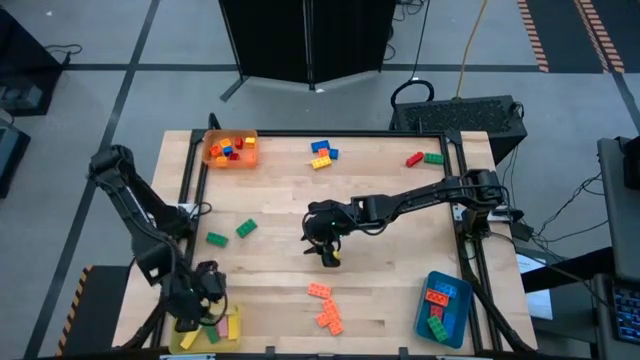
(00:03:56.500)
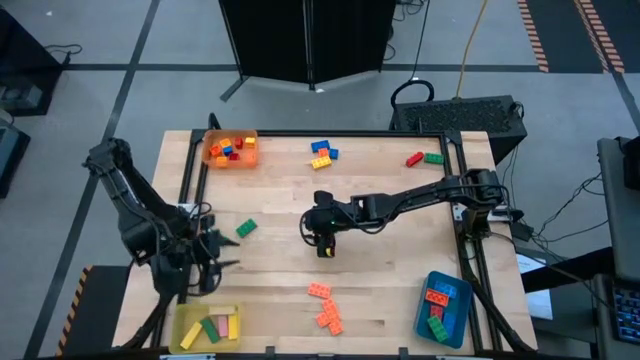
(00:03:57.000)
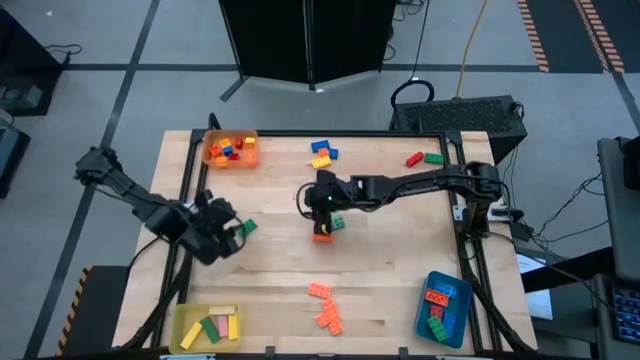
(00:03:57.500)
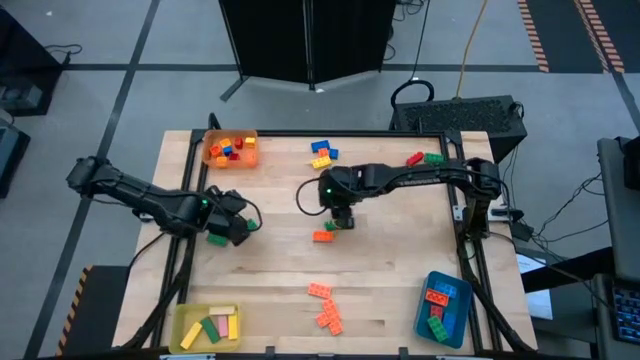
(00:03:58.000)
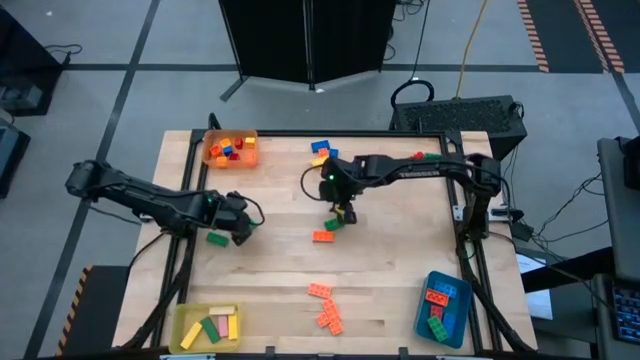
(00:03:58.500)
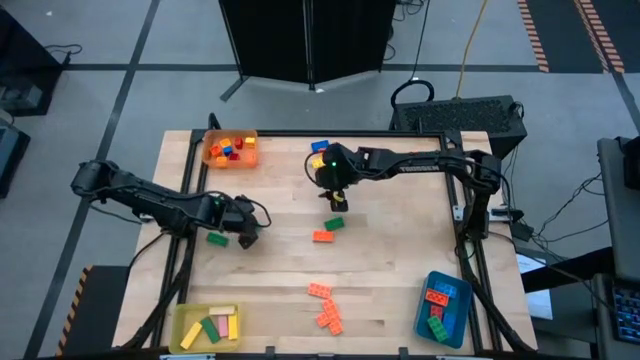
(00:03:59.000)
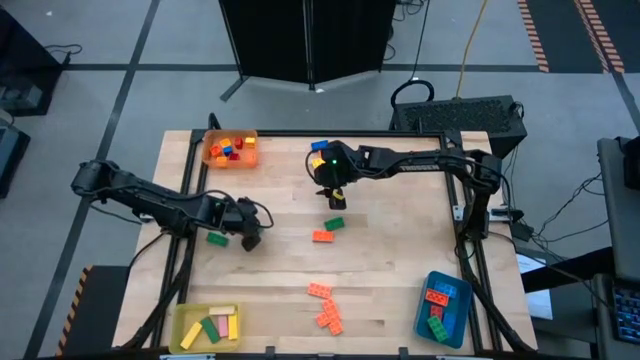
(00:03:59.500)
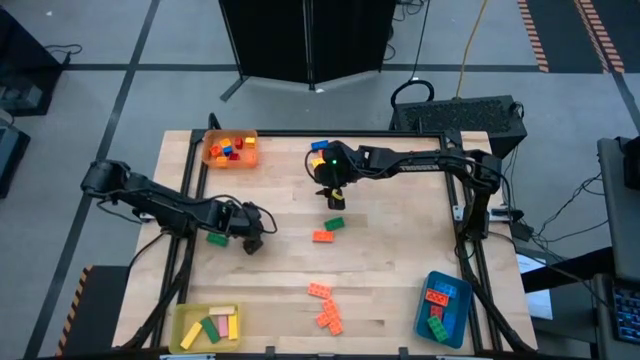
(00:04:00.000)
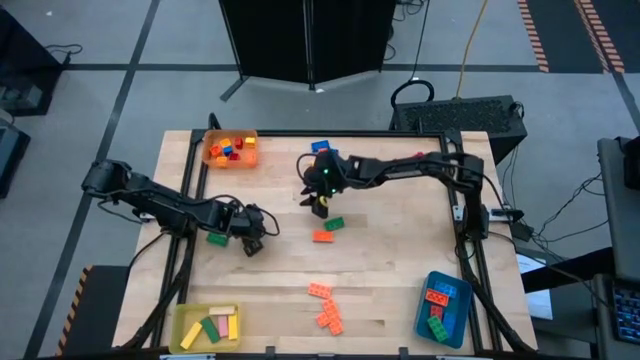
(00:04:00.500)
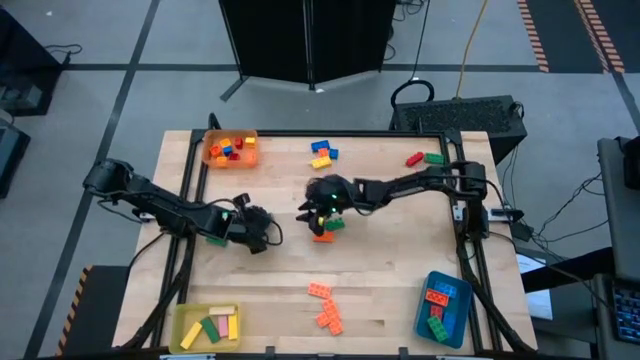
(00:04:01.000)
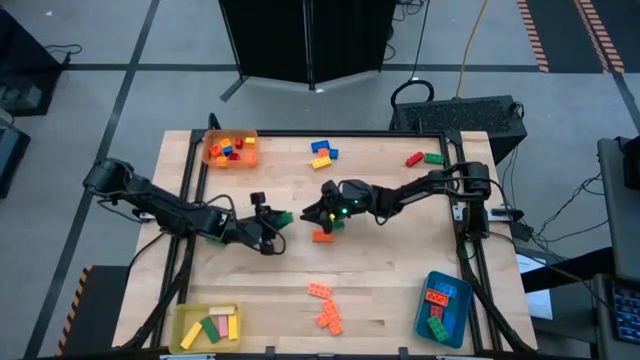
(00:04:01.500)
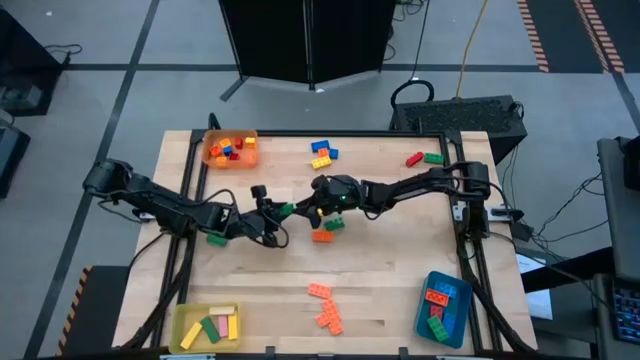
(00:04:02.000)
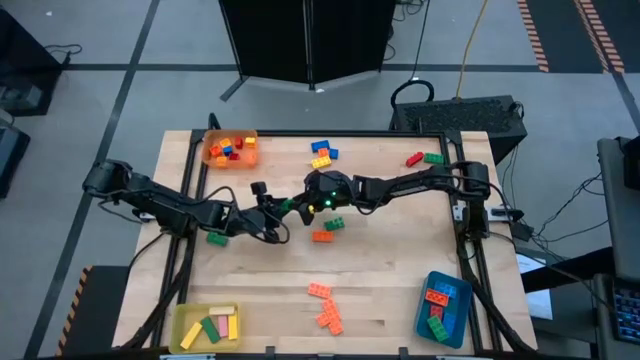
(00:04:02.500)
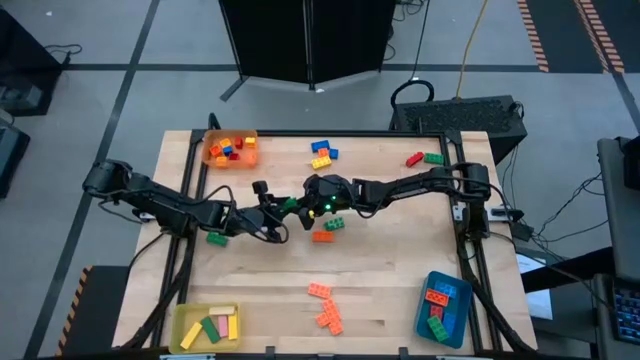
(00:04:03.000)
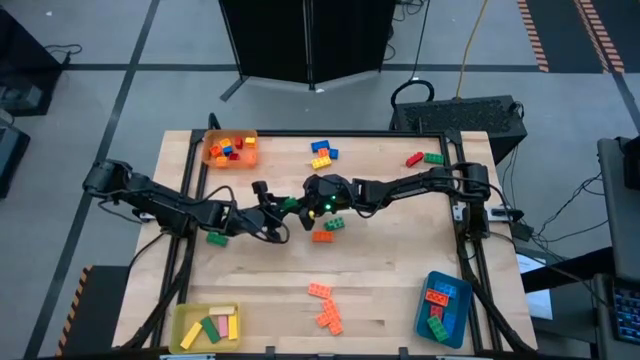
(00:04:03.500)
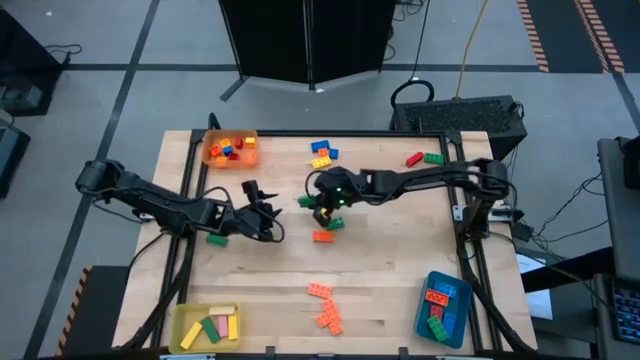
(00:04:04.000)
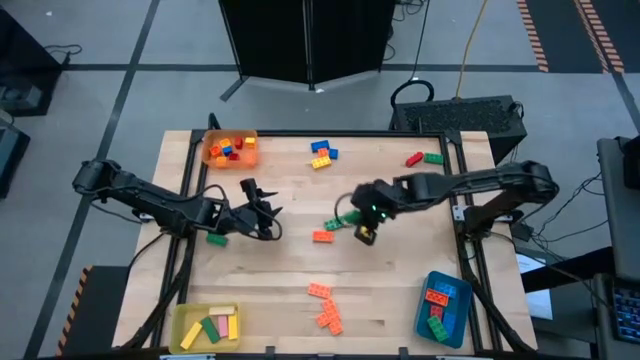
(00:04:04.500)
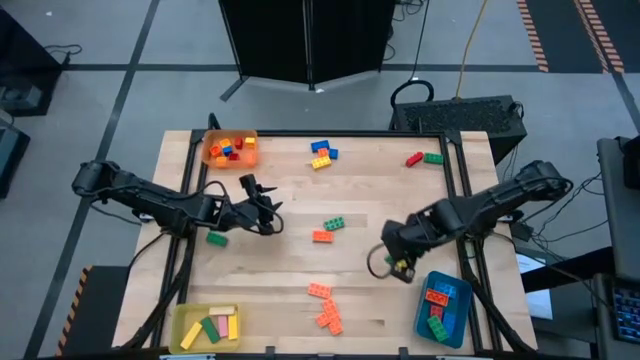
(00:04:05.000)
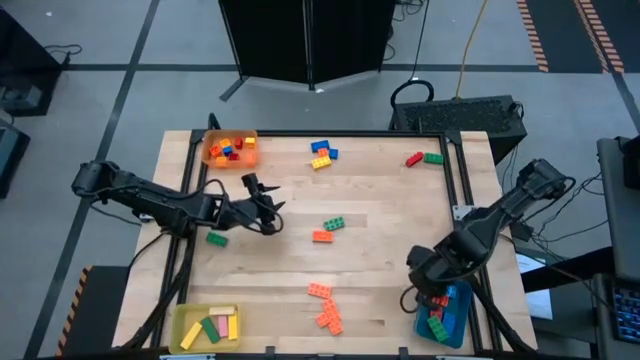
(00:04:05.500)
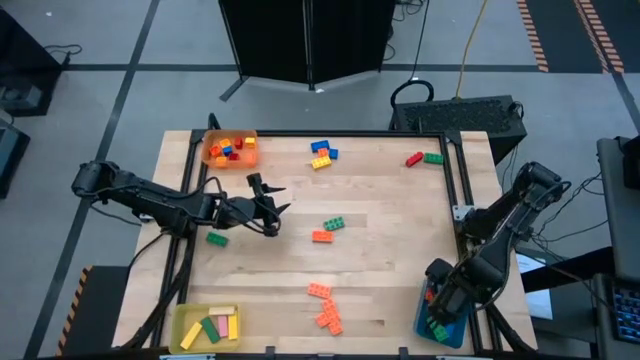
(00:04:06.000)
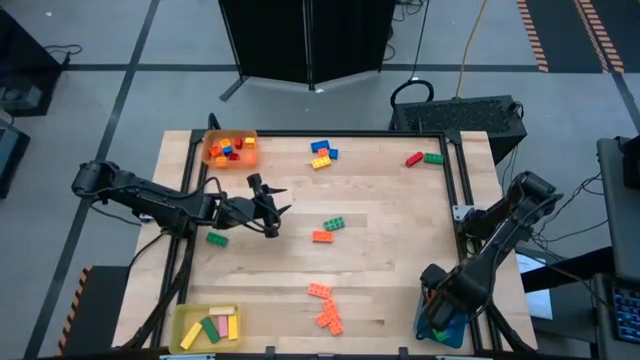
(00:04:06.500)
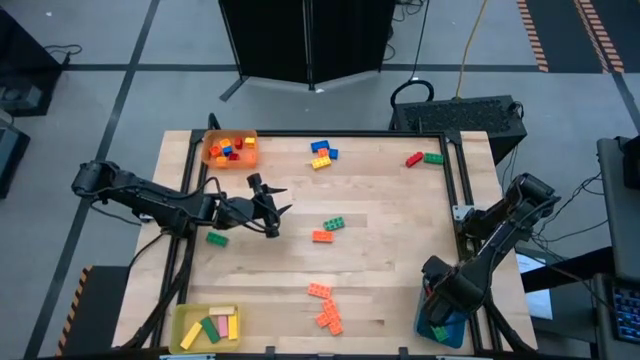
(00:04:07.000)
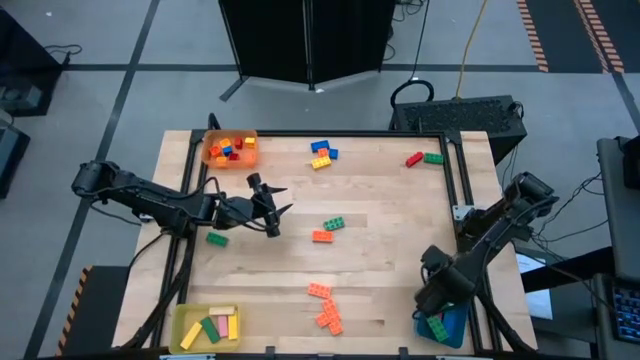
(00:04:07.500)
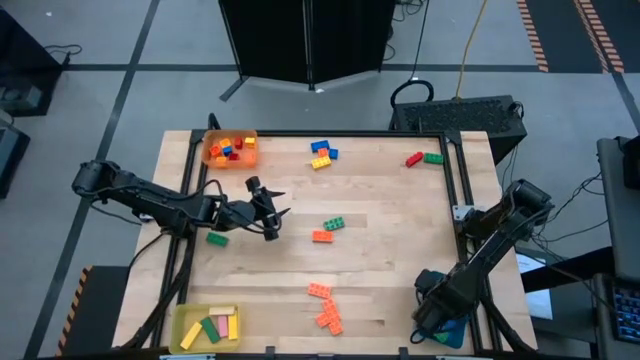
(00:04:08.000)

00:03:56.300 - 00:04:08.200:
Task: Sort blocks by size
Put the green 8 stud game piece into the blue bin

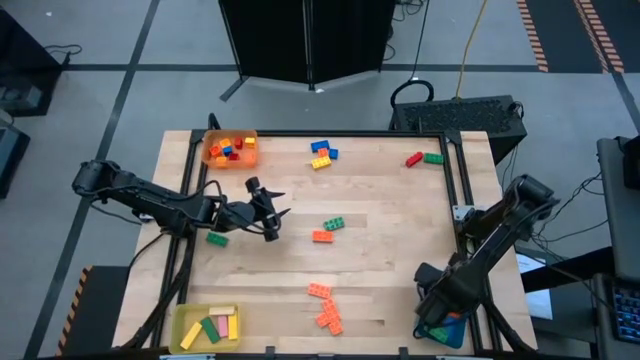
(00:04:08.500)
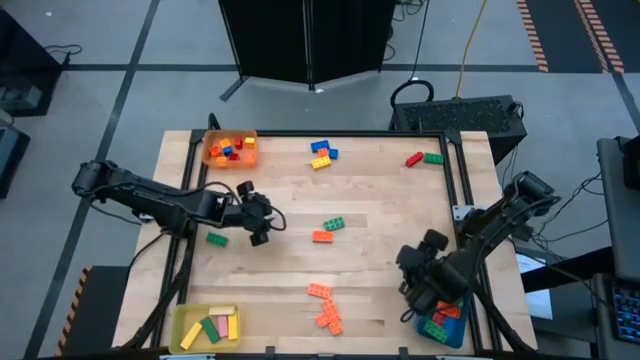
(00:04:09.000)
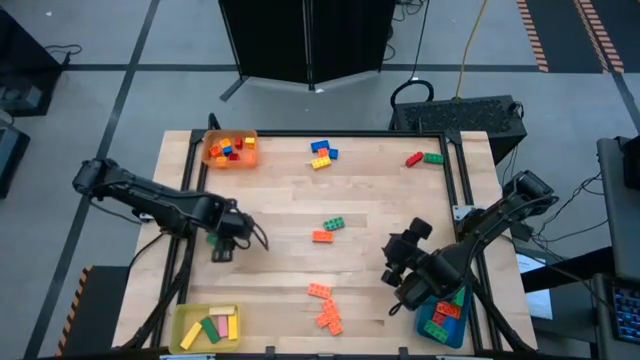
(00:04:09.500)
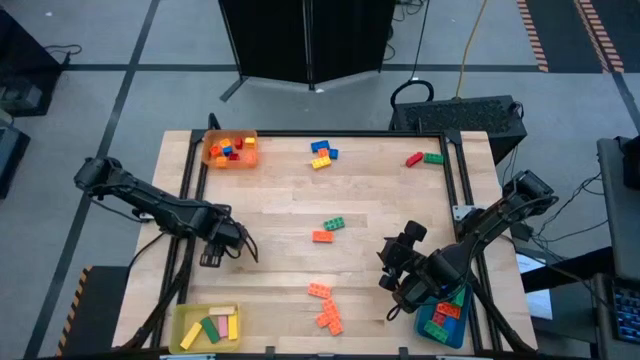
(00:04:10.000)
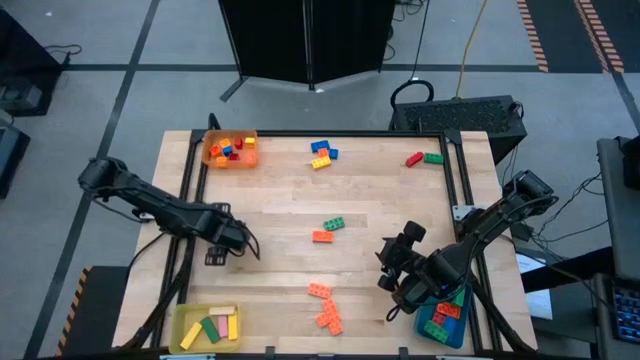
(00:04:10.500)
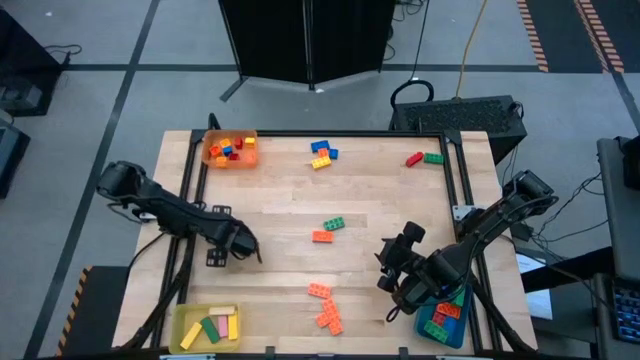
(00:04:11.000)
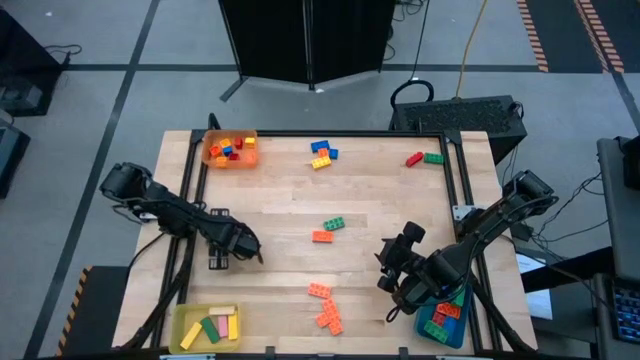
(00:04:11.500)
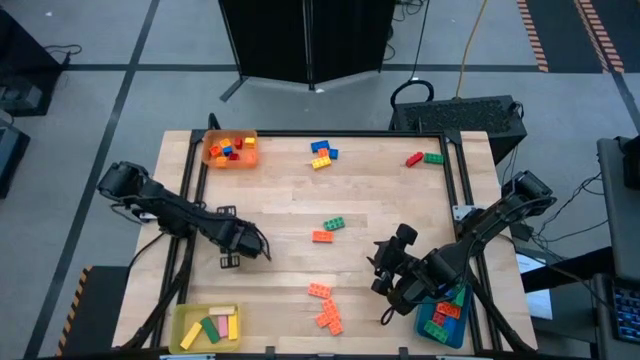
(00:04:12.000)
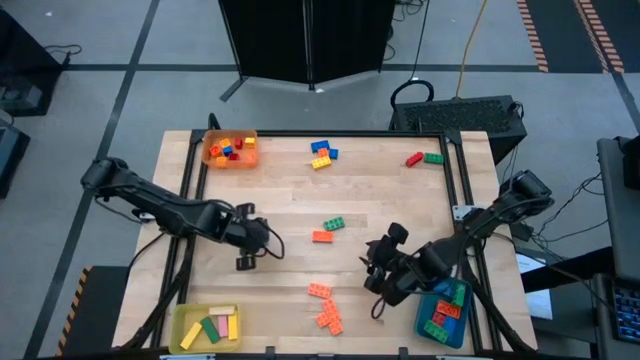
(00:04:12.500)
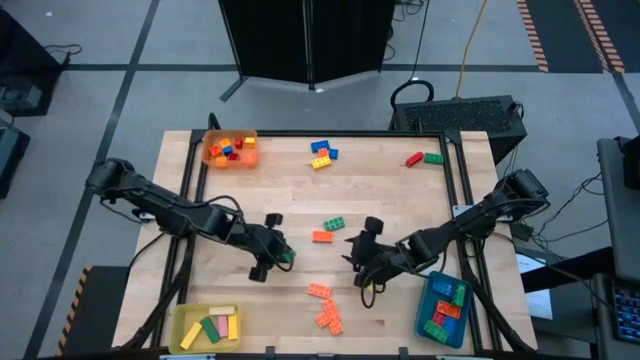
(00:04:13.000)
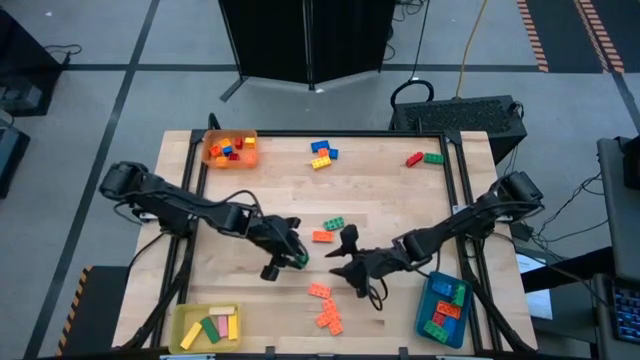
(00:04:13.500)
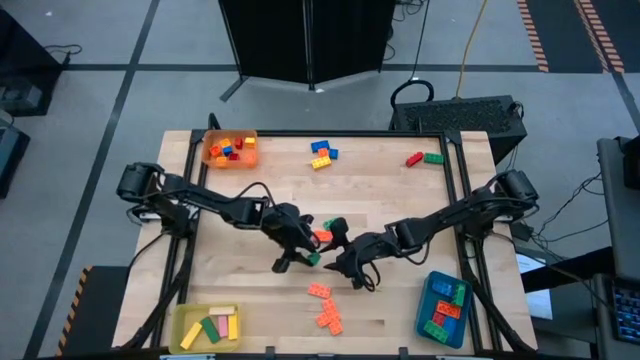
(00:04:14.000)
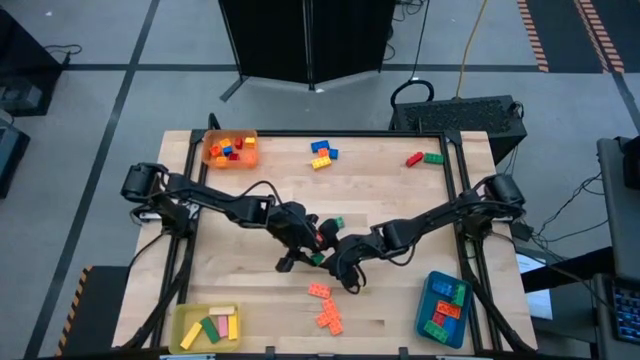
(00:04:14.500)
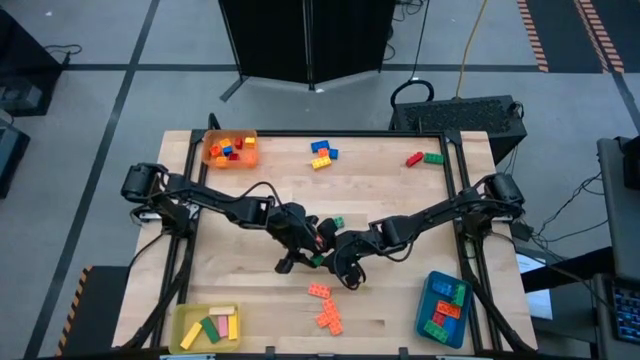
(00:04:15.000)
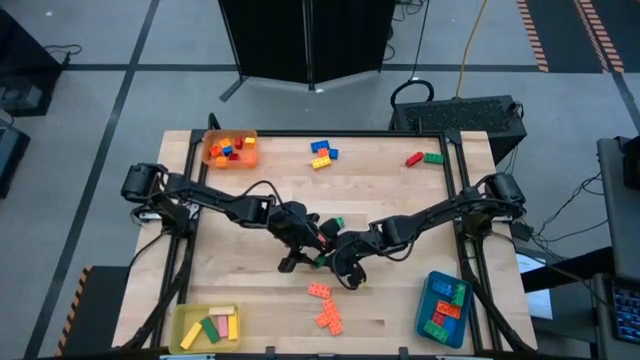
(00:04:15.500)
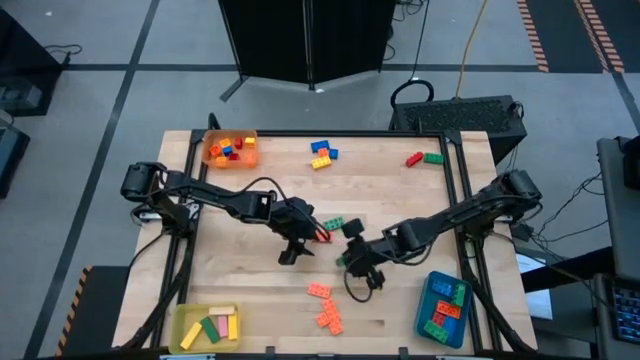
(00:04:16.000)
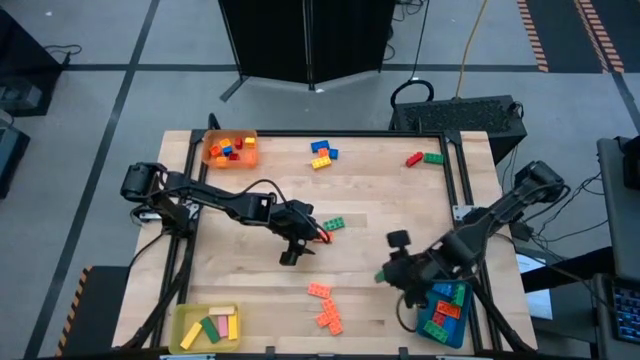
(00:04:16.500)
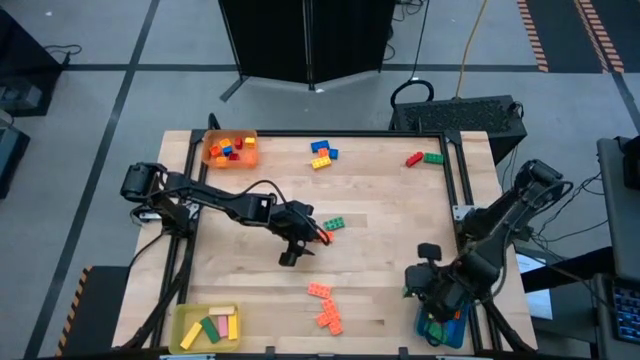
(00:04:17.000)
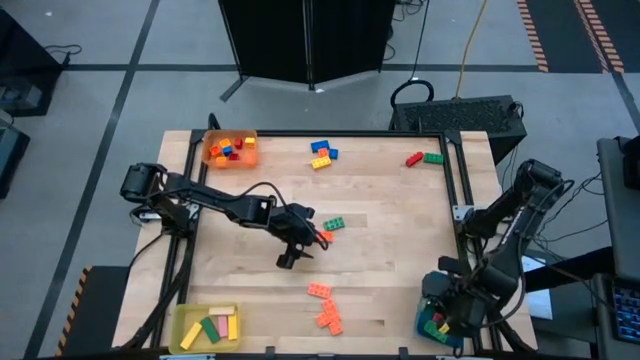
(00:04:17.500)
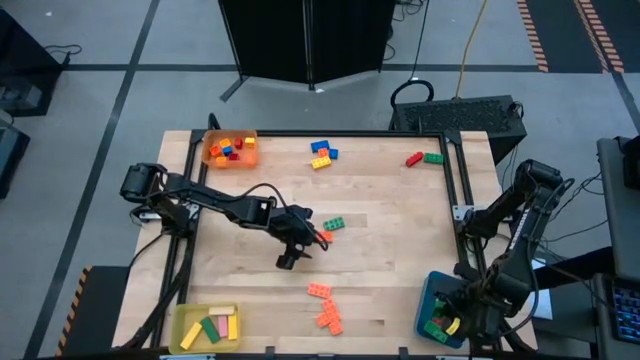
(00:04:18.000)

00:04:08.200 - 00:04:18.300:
Put the green 8 stud game piece into the blue bin
